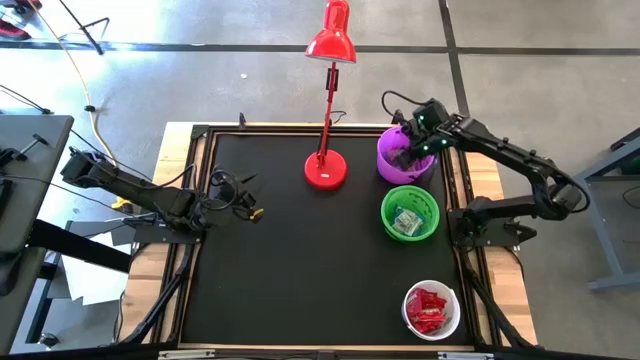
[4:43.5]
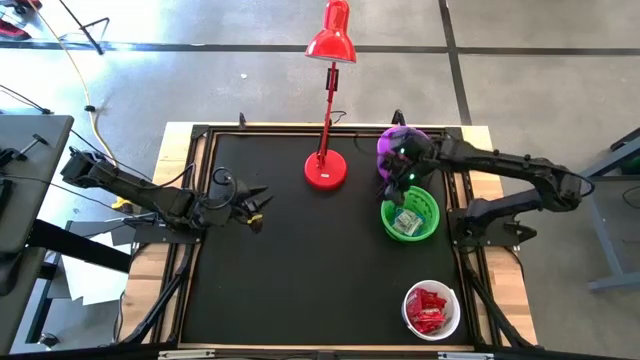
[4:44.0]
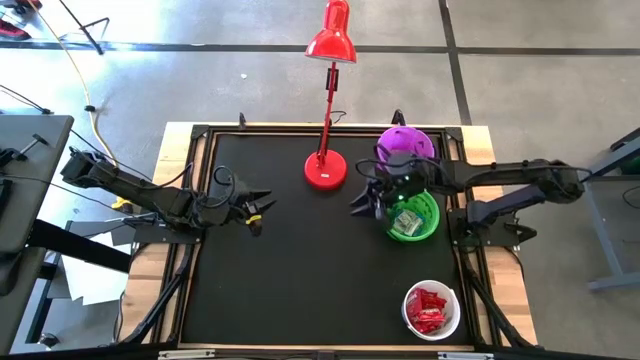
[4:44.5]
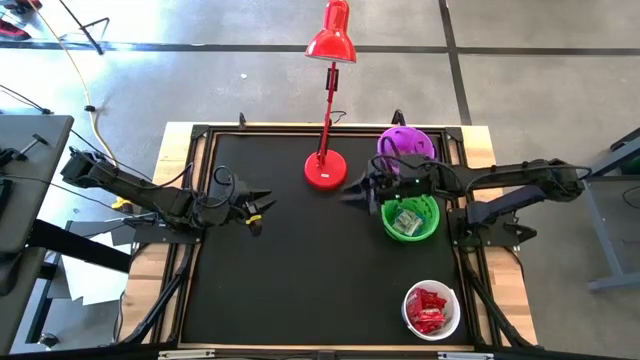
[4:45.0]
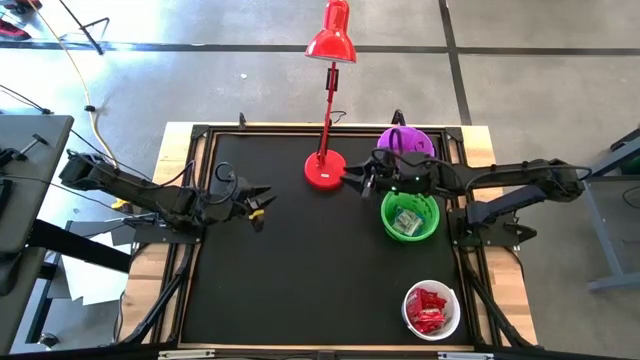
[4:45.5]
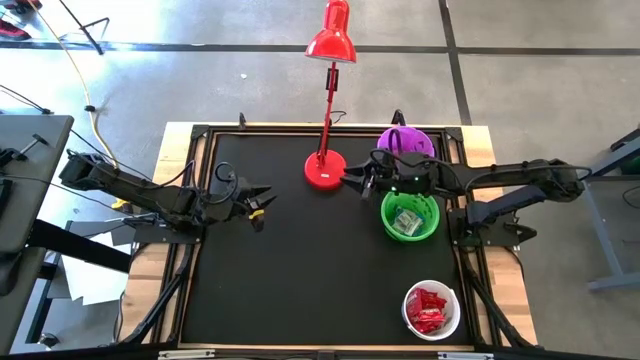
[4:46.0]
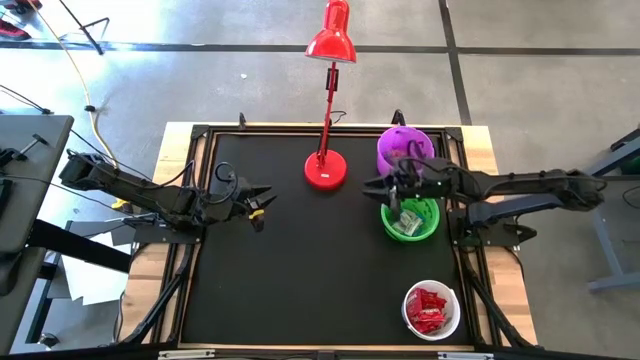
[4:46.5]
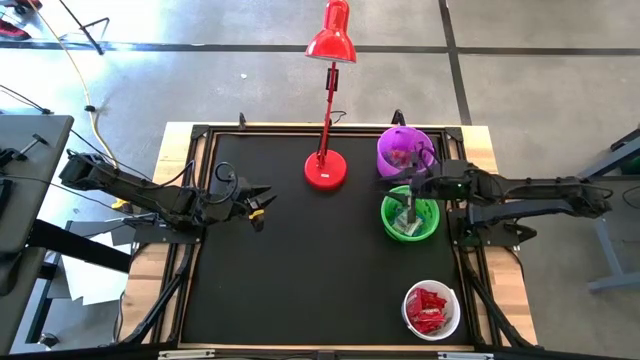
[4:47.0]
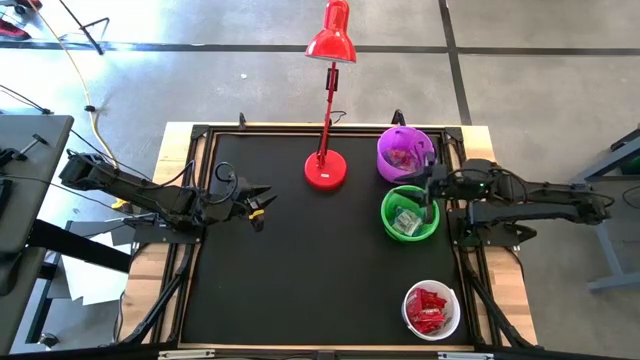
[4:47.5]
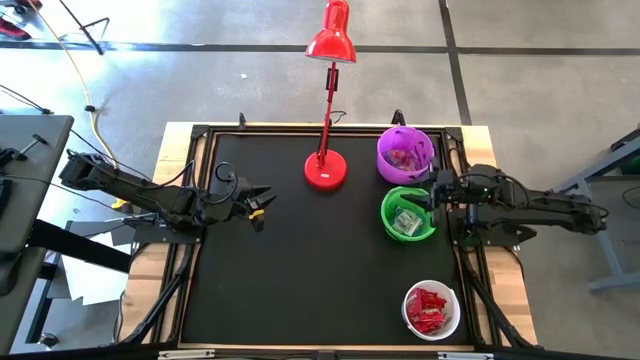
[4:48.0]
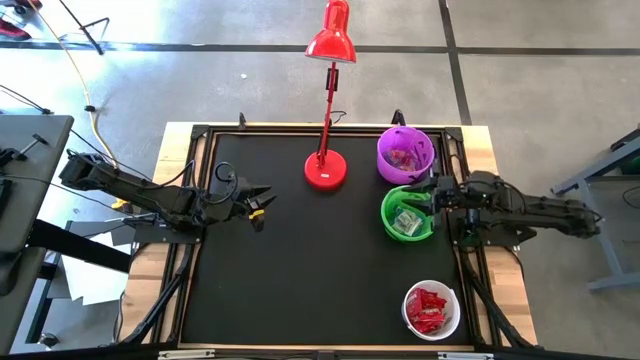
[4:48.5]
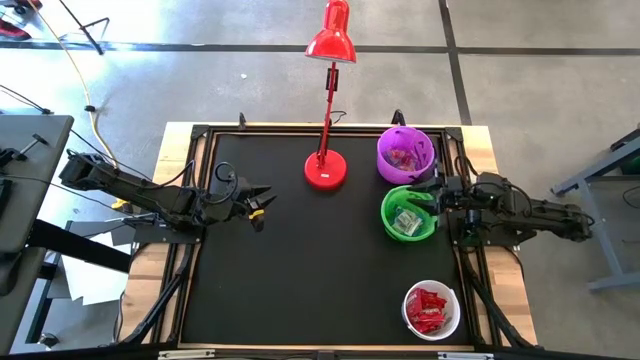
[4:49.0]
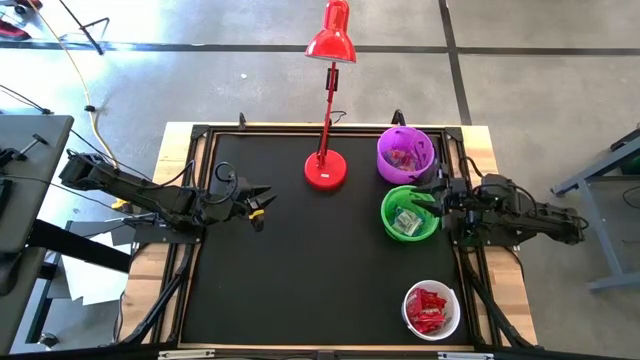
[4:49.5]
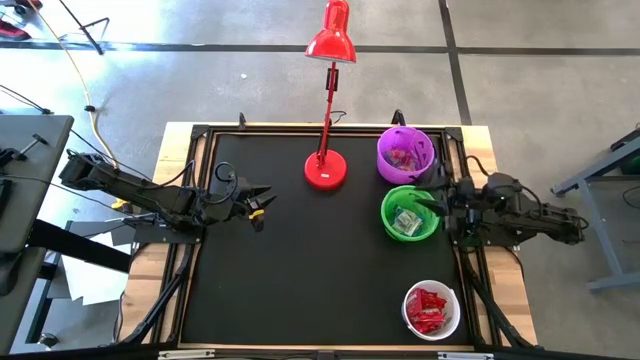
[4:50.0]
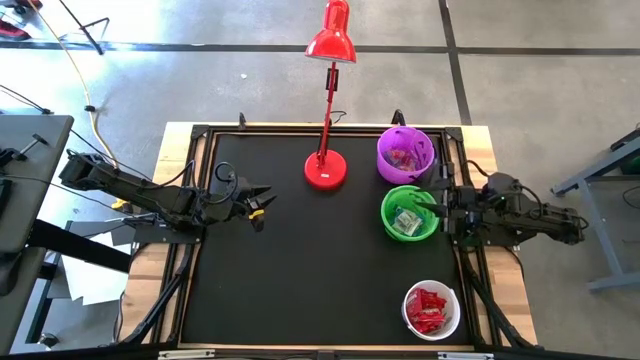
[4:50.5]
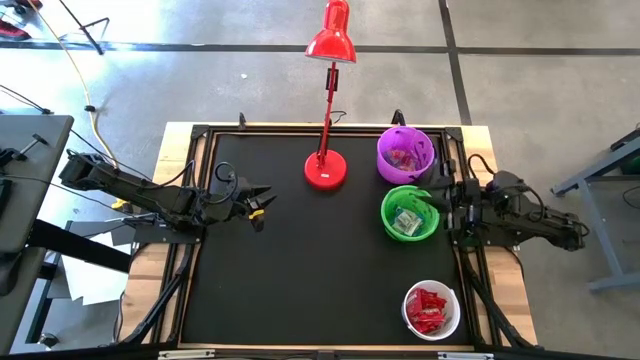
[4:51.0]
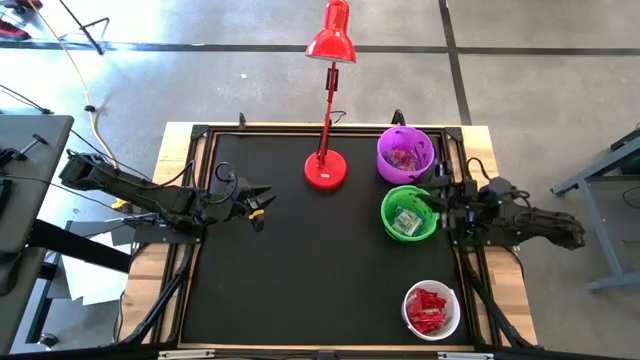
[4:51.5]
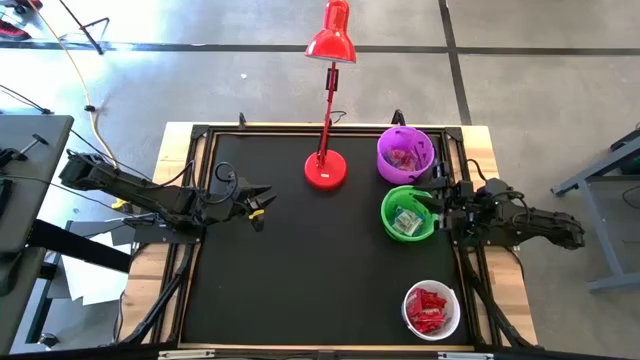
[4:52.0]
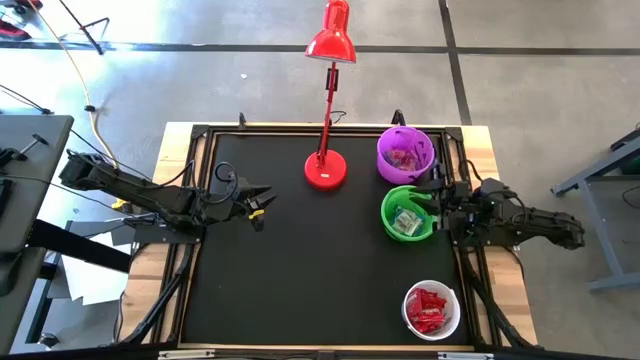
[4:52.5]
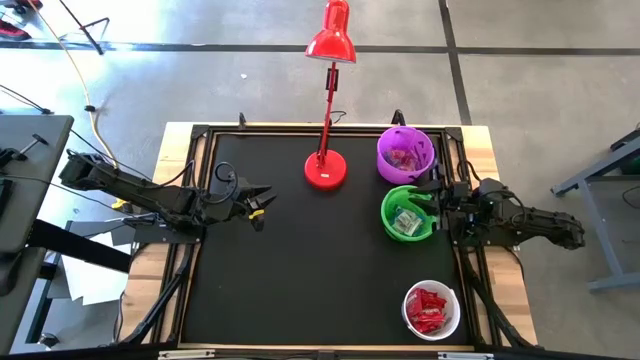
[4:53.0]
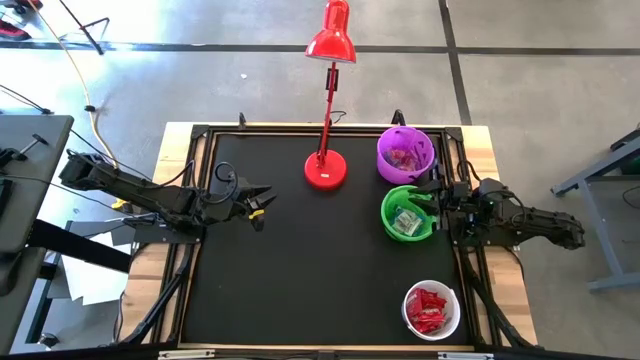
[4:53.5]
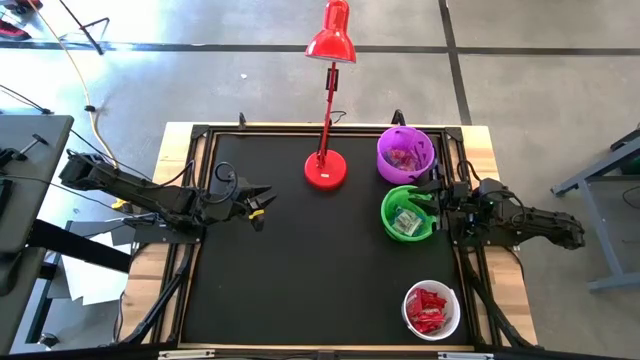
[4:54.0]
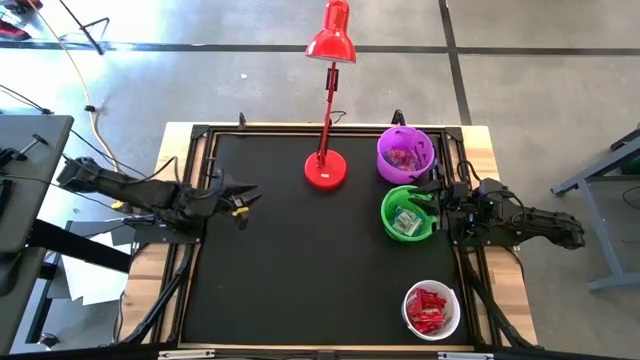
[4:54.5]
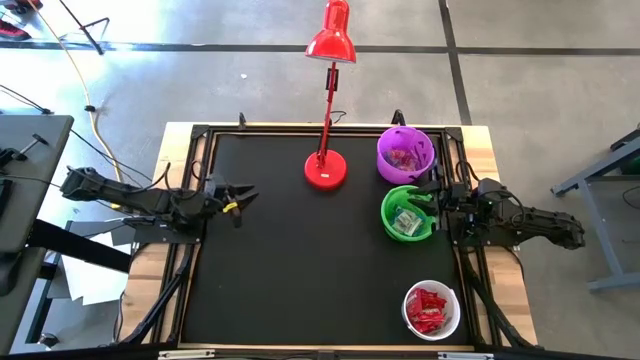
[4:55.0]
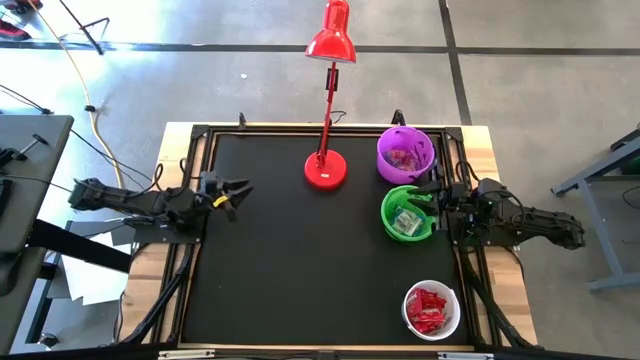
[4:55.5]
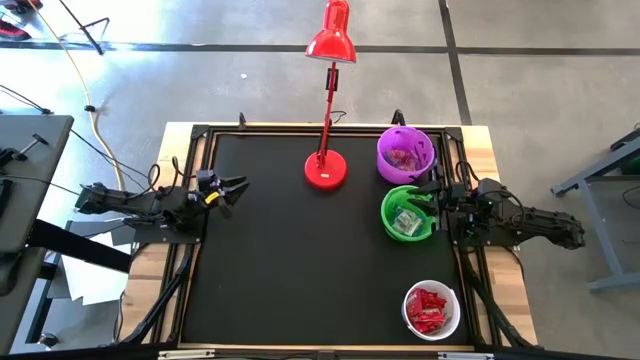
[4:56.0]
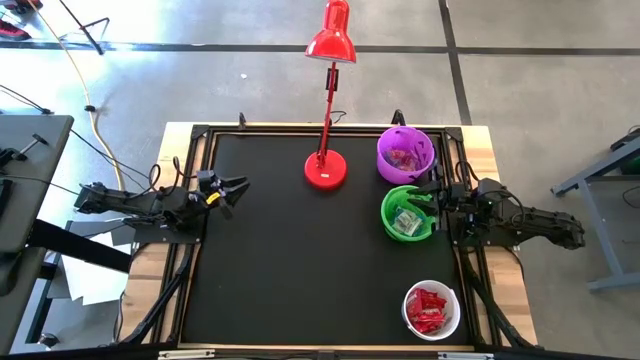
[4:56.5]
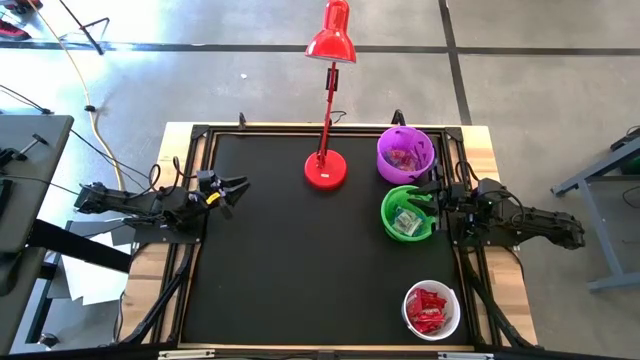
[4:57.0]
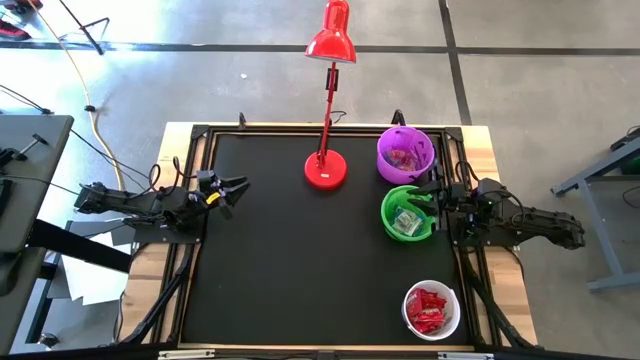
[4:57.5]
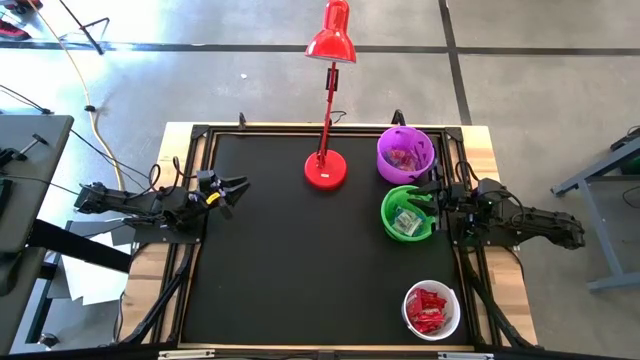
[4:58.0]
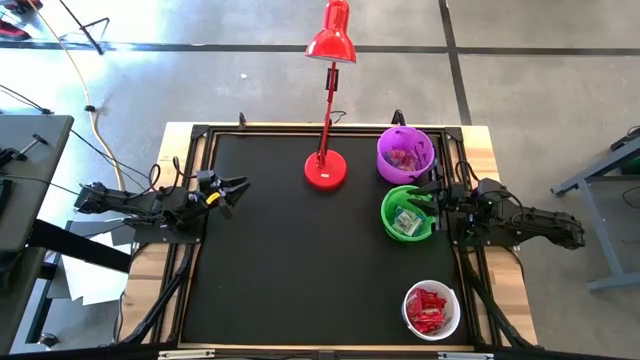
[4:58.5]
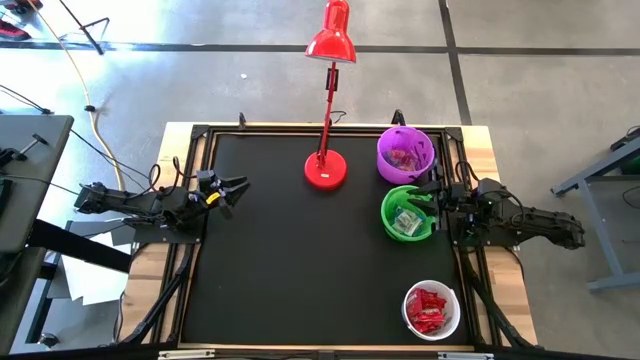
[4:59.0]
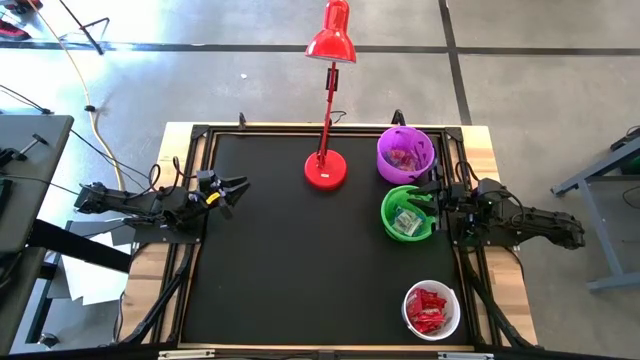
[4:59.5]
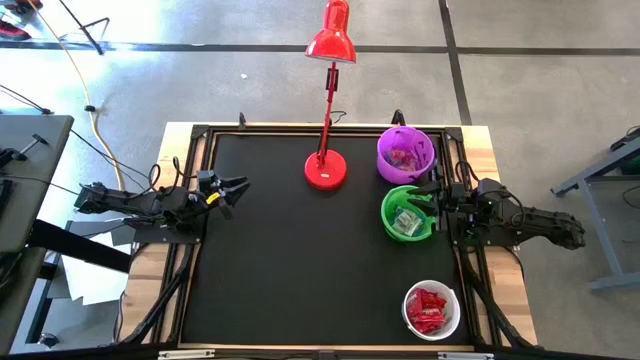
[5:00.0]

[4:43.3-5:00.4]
Task: Organize candy in baskets
Return to Home Position

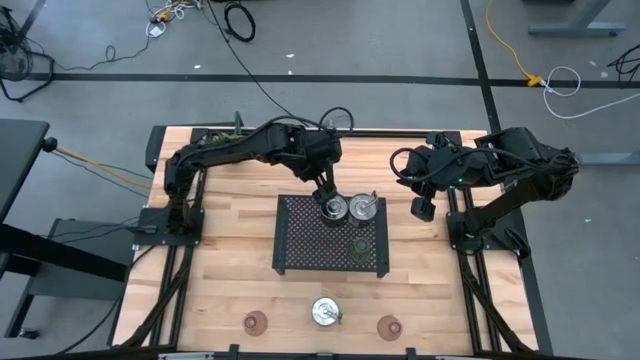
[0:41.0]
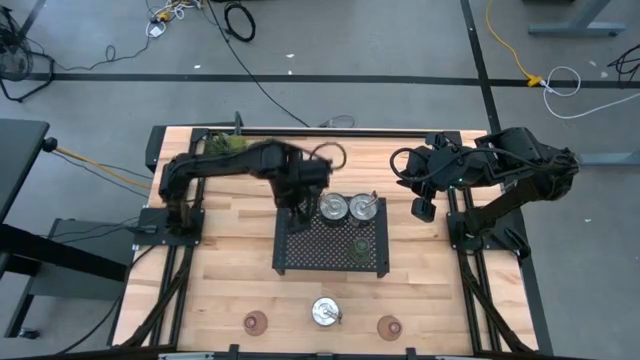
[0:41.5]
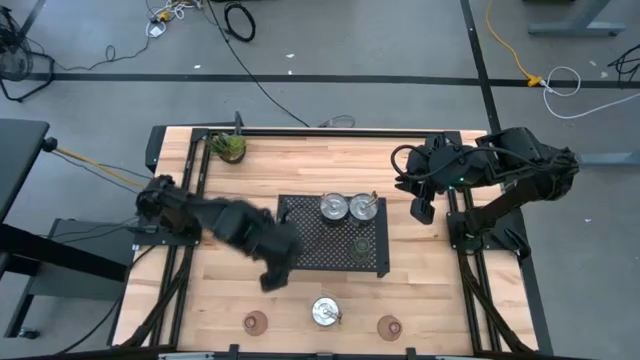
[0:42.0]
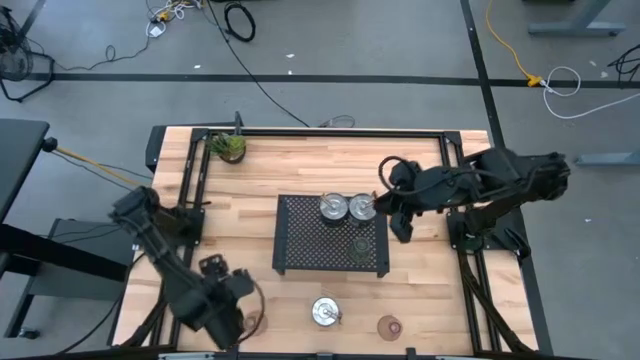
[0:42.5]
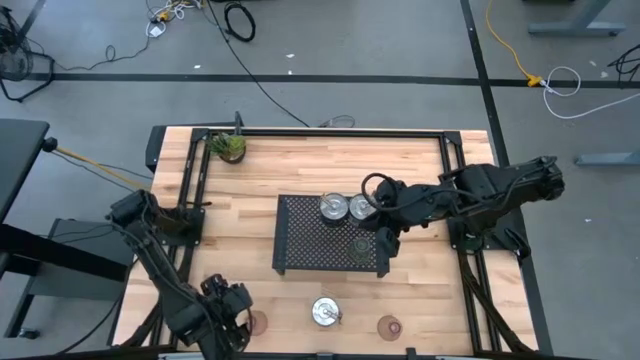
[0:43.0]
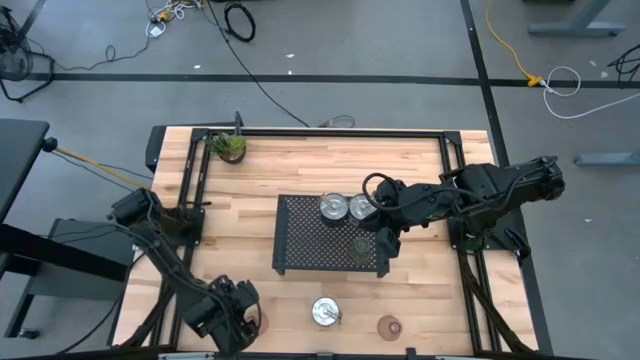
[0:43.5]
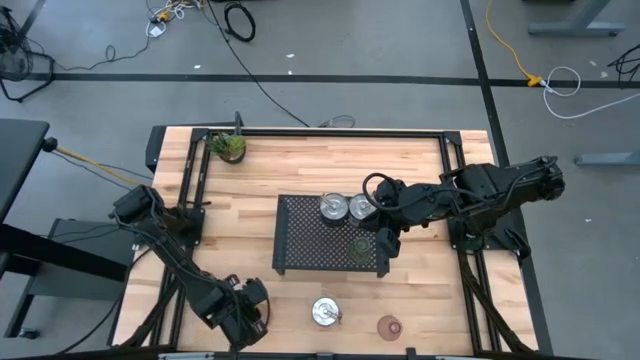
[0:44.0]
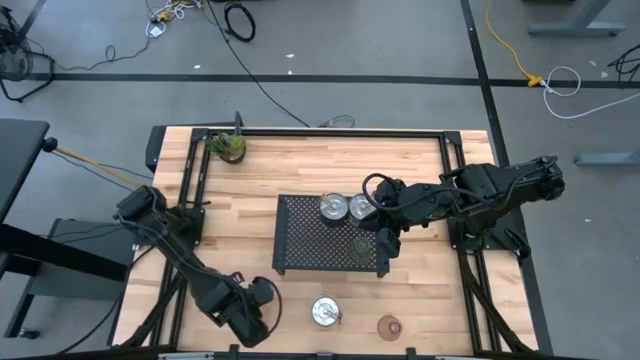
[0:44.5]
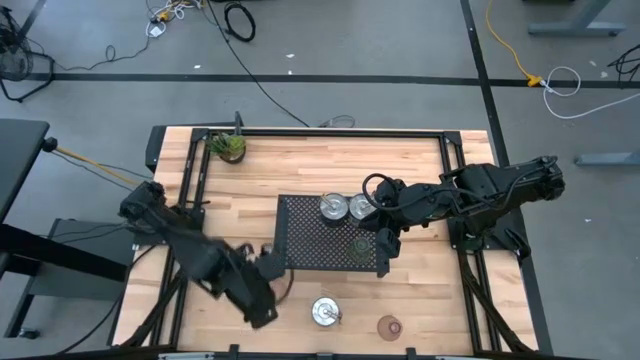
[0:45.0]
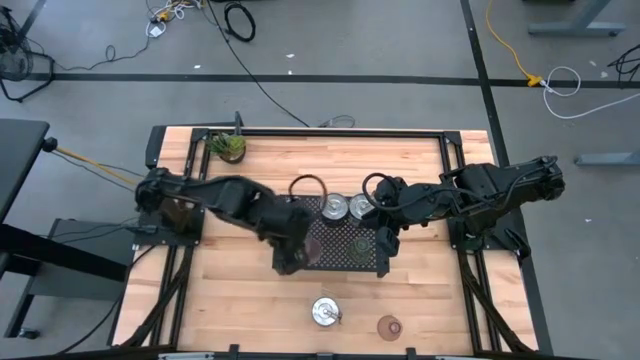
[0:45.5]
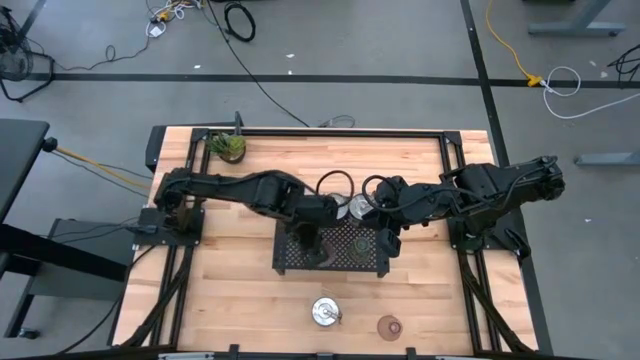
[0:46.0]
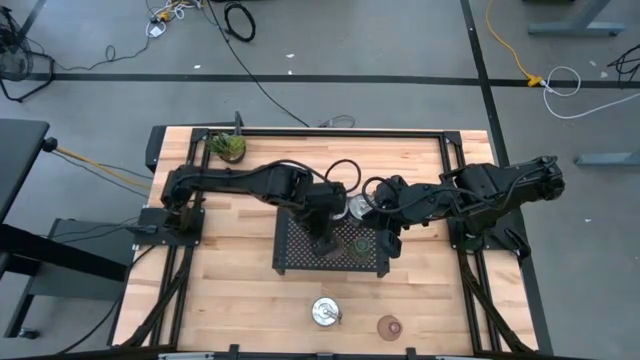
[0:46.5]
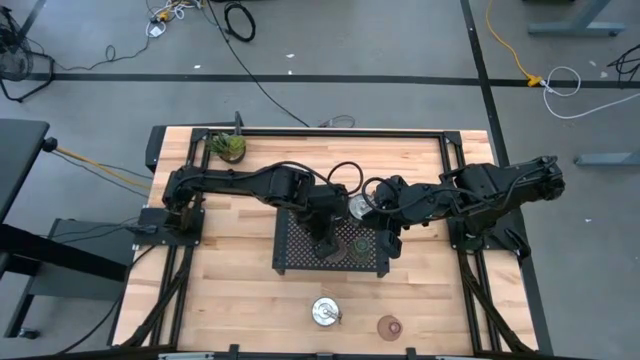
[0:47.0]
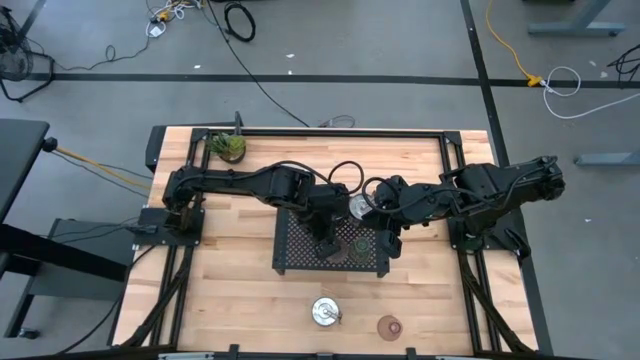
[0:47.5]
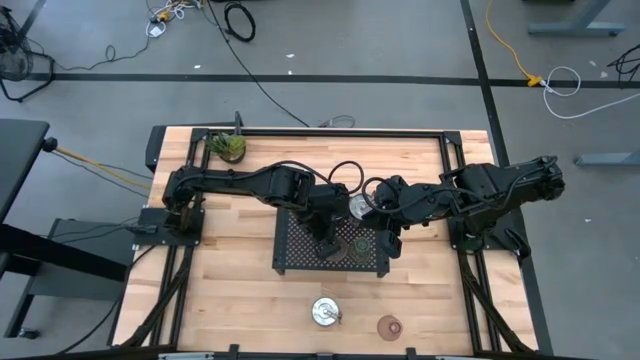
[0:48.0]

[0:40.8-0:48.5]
Task: Pick & Place candle stick holders
Put the left pink candle holder on the shelf aligned with the green candle holder
